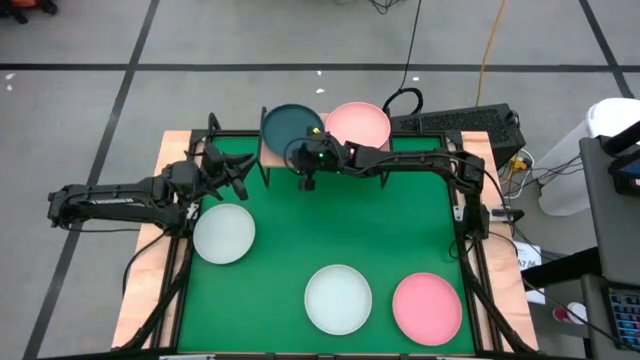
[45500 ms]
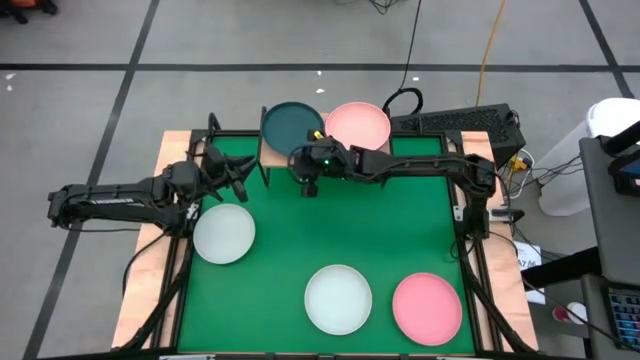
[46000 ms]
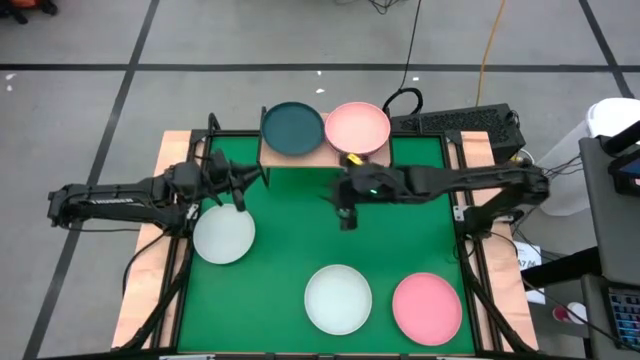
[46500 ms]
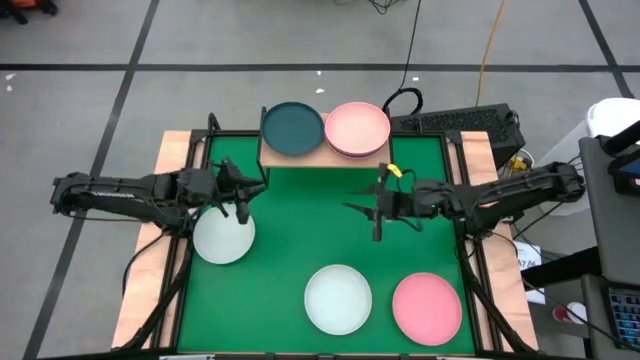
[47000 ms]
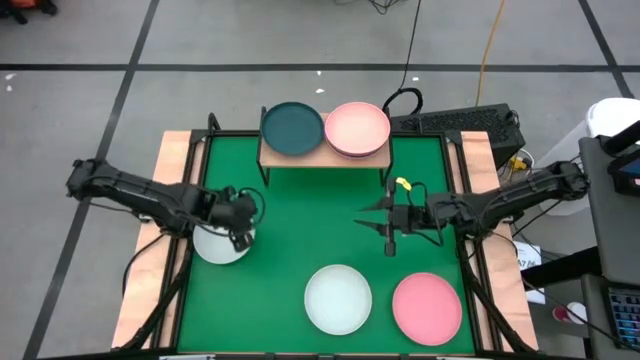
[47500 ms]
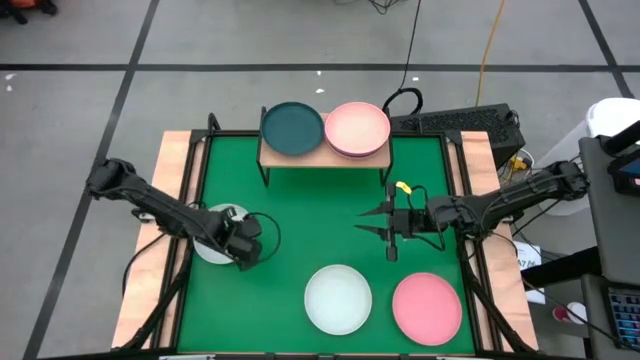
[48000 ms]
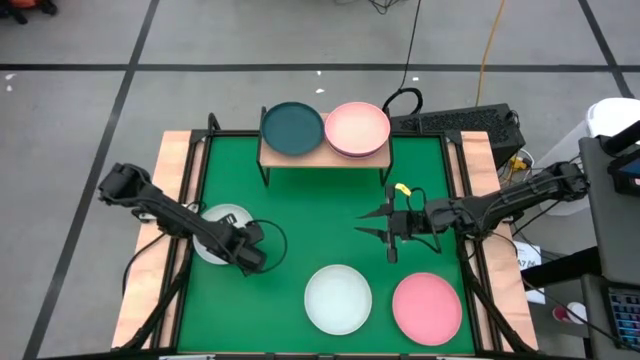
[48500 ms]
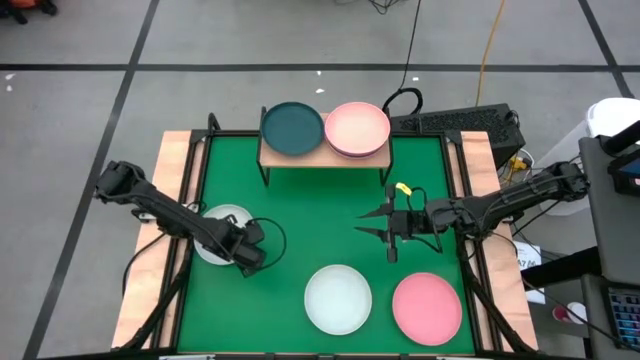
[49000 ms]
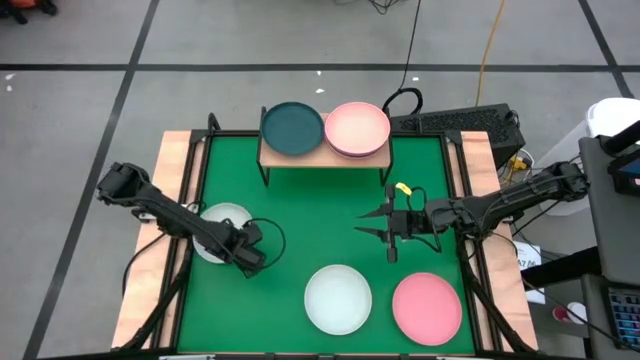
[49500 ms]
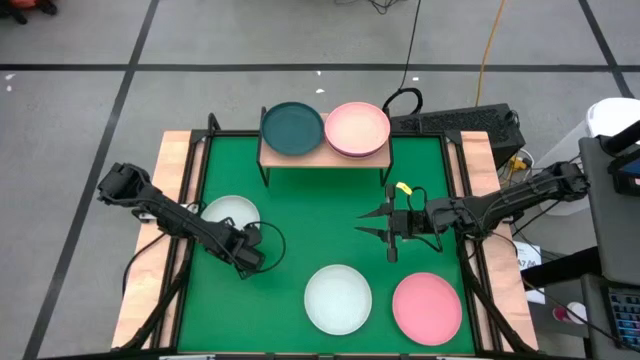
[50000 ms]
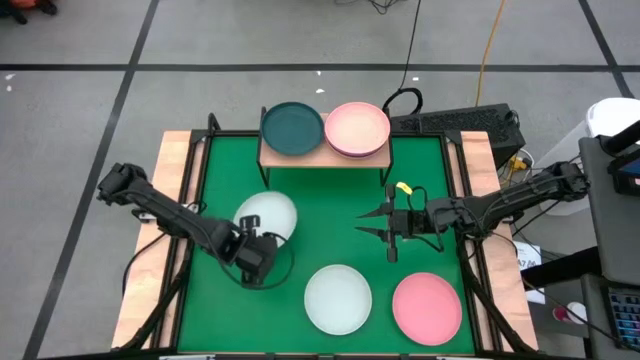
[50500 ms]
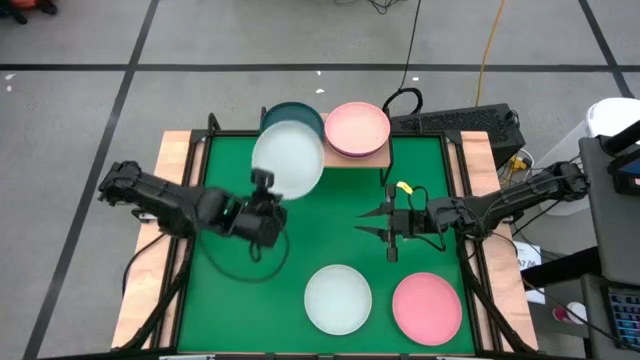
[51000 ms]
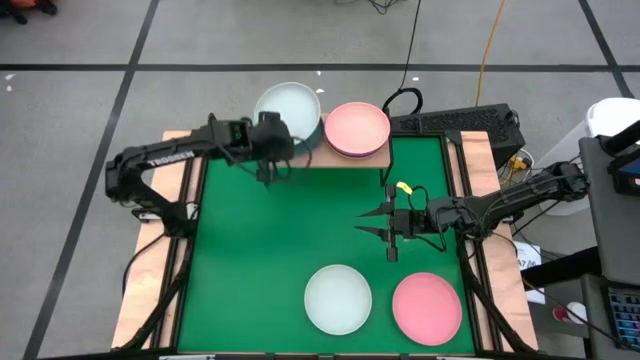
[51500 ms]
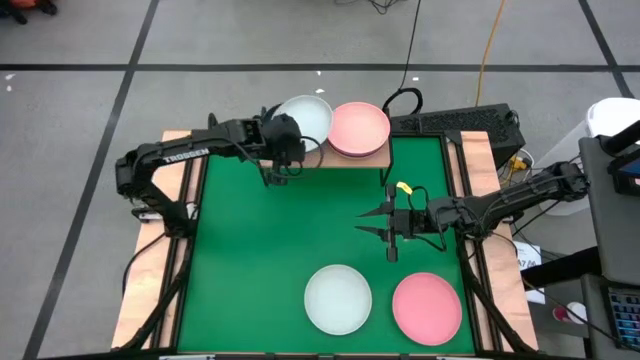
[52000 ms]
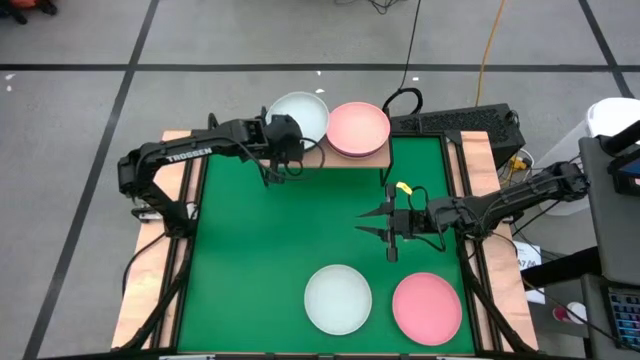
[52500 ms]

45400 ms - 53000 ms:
Task: Place and stack plates onto a shelf
Stack the left white plate on top of the dark green plate

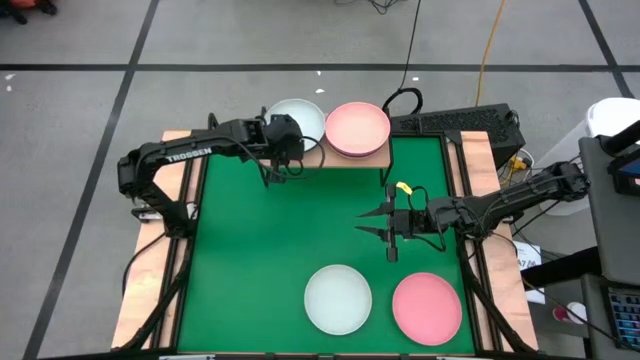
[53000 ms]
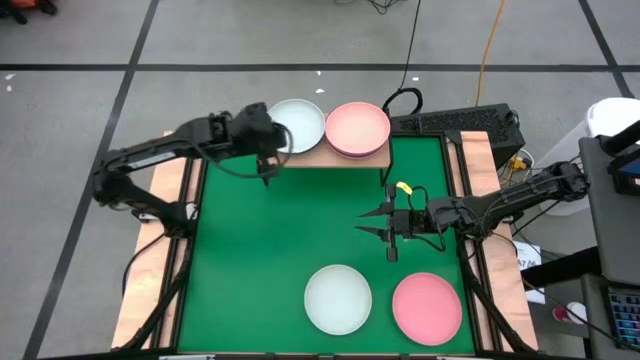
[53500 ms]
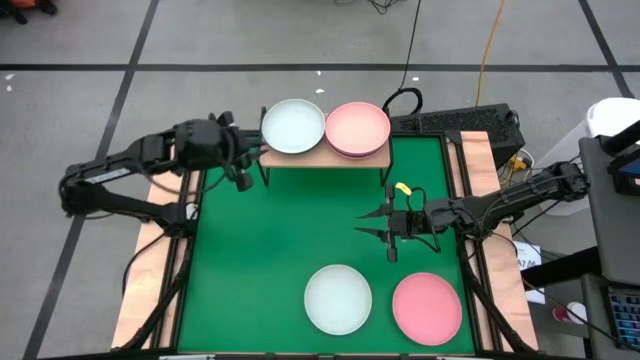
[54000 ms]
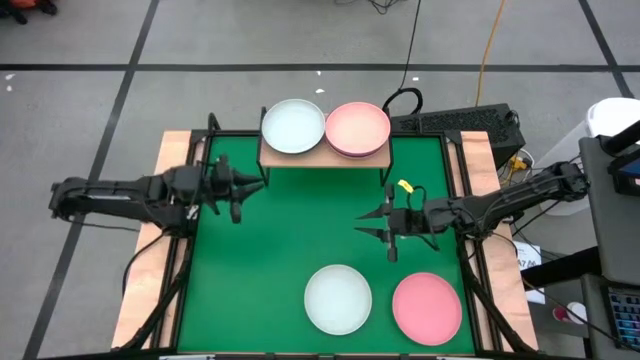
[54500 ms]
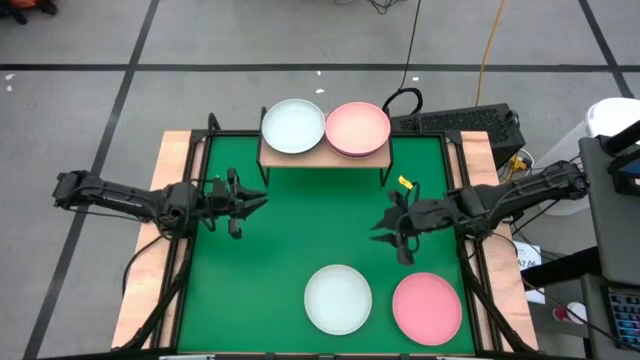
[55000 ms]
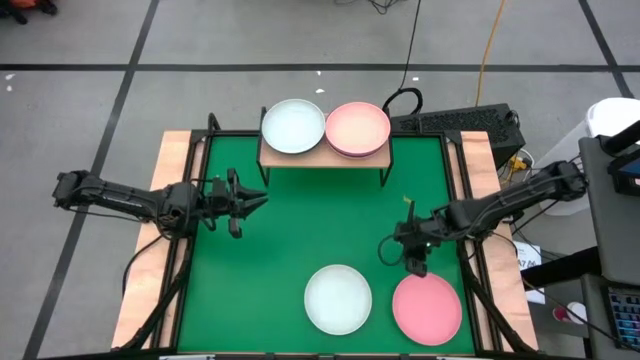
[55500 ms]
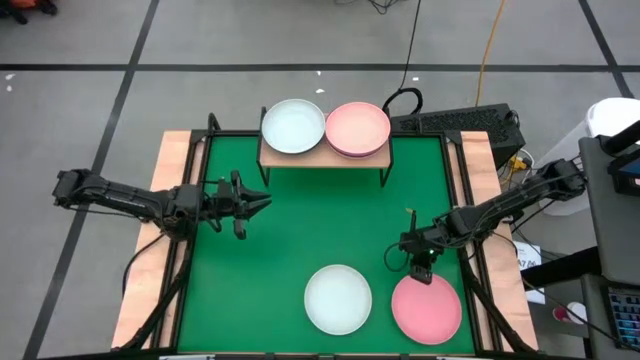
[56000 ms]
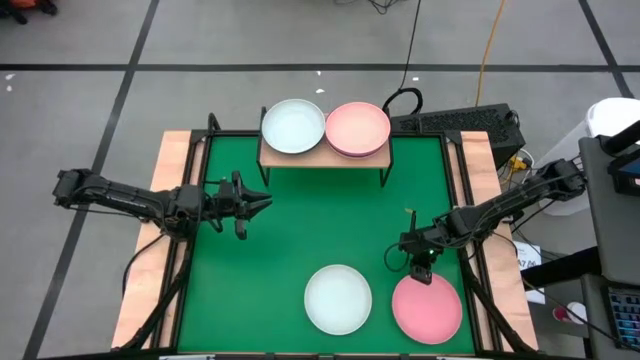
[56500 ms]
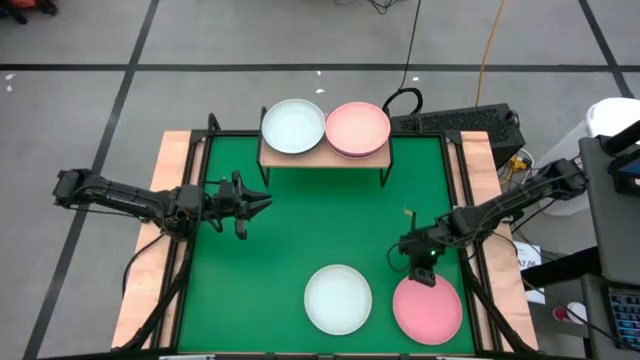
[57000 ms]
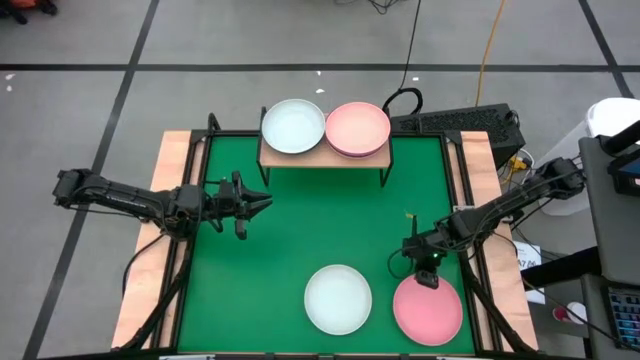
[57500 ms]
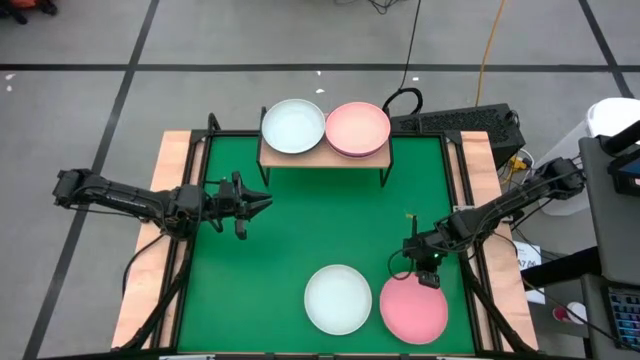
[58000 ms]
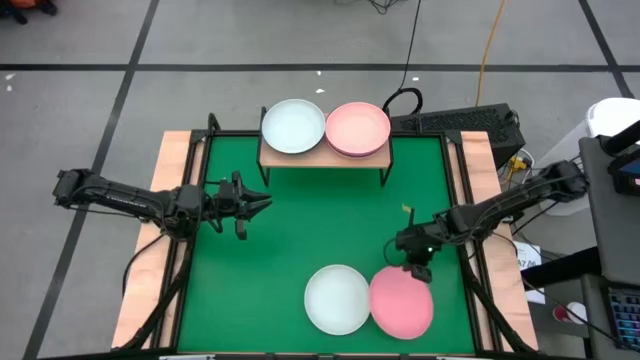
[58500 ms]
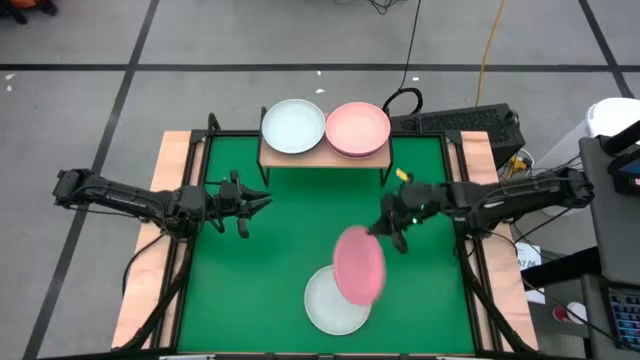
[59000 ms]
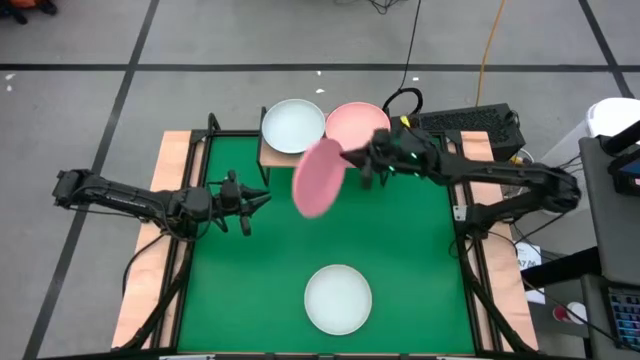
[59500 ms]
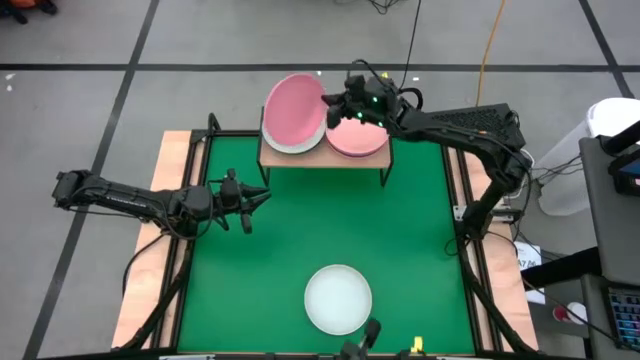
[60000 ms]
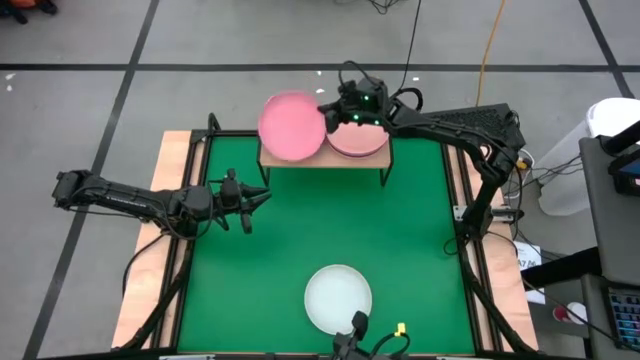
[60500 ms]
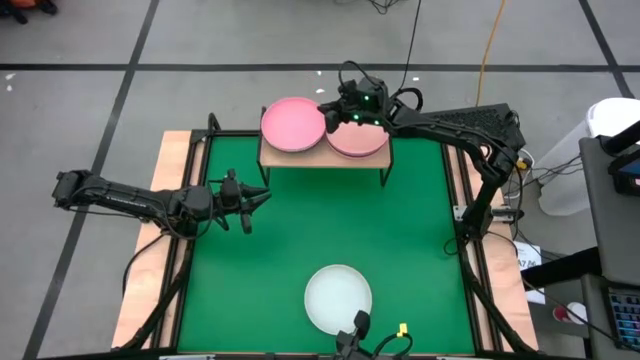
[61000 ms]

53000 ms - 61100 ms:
Stack the light pink plate on top of the white plate

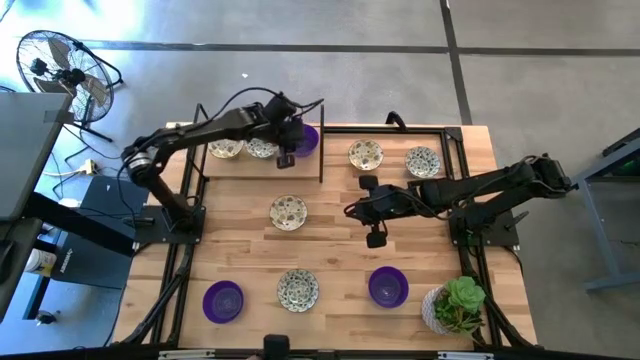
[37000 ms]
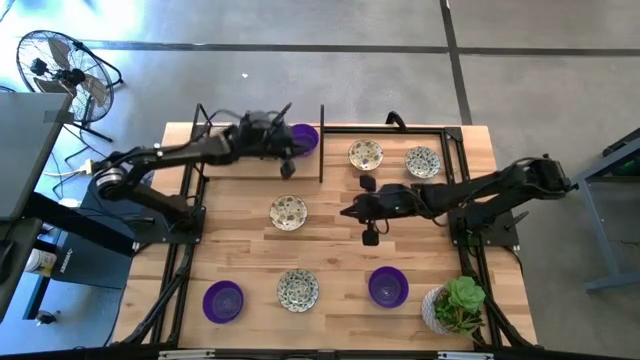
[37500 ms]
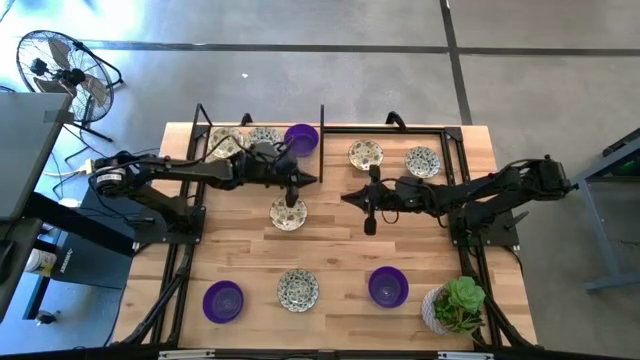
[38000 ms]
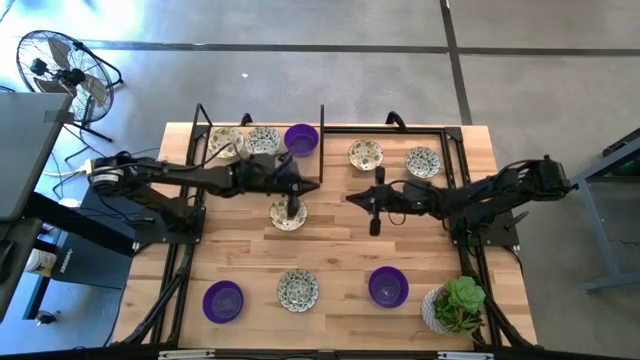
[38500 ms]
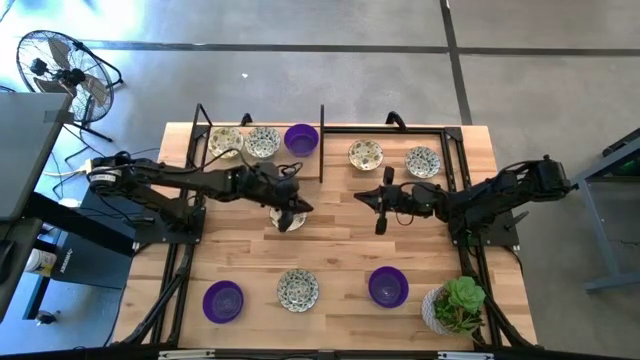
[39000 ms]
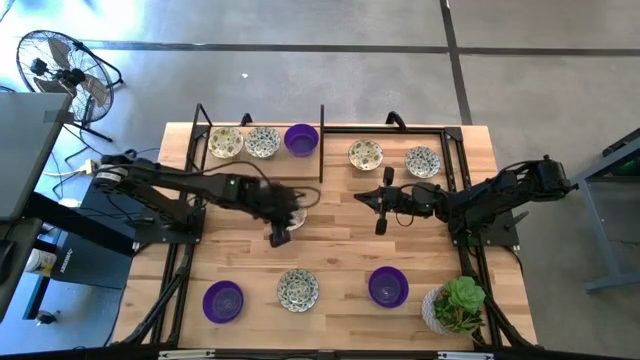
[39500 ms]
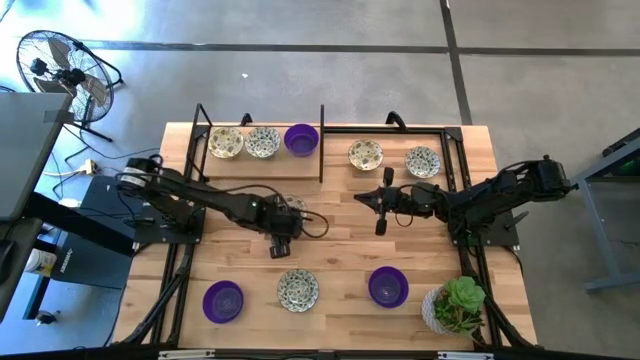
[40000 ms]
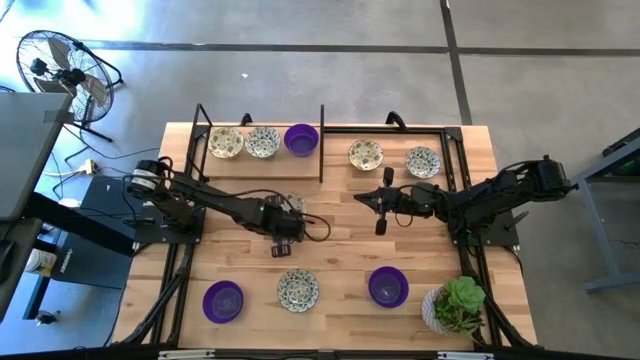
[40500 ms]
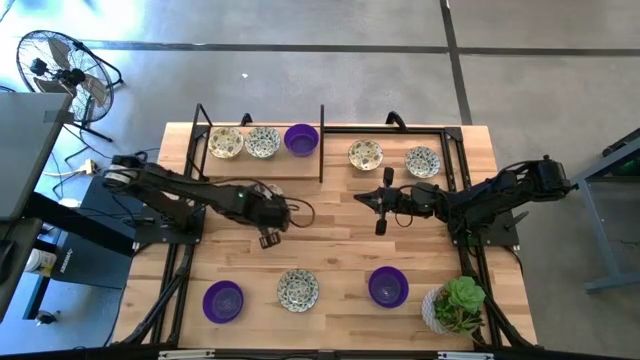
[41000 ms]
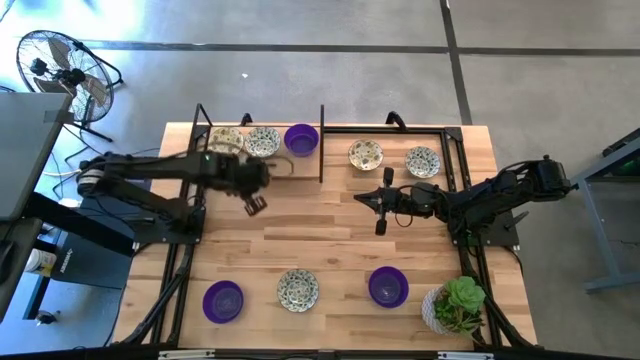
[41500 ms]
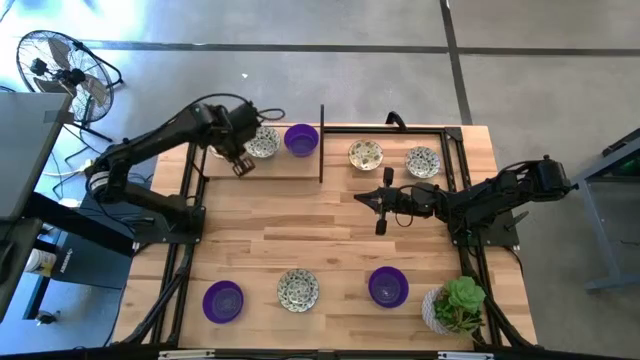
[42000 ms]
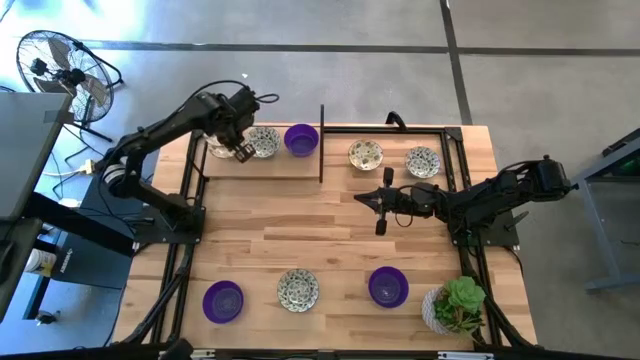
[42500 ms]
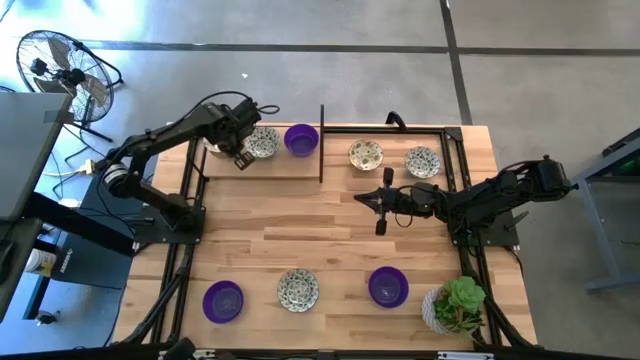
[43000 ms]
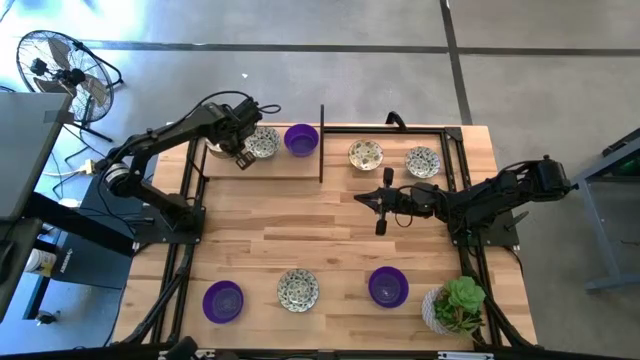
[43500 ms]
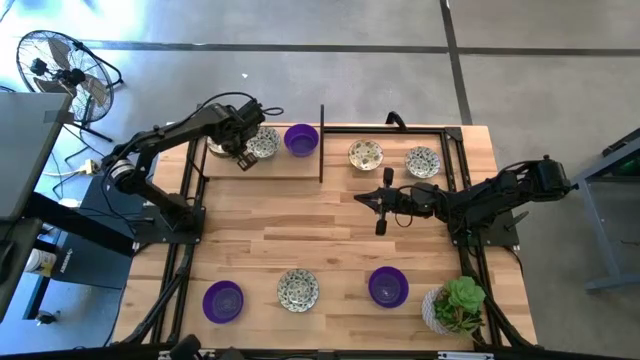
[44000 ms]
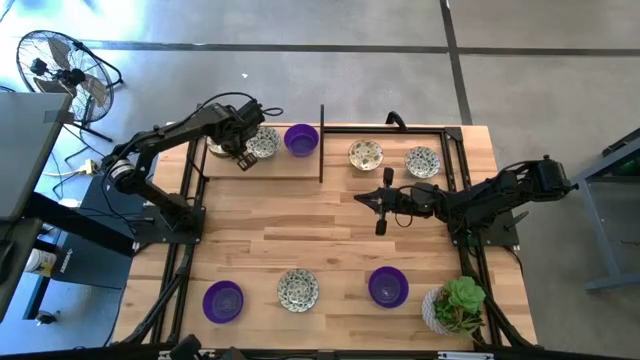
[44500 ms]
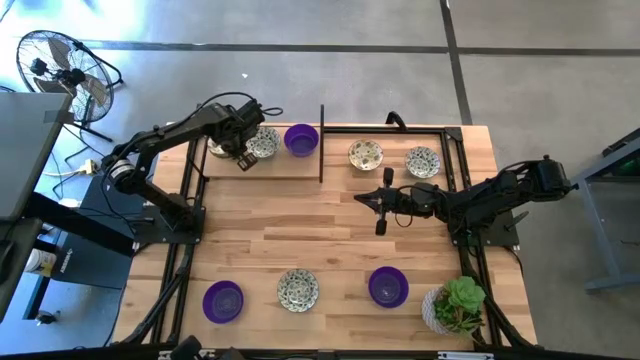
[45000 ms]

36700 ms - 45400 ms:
Task: Pick & Place Mini bowls
Stack the bottom yellow bowl on top of the other yellow bowl on the shelf
